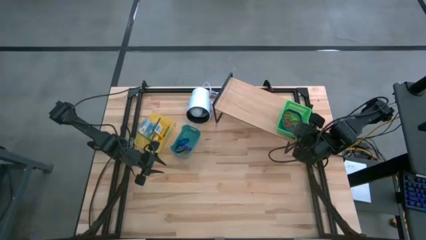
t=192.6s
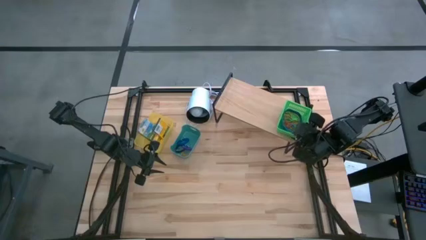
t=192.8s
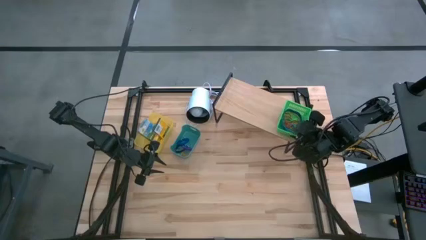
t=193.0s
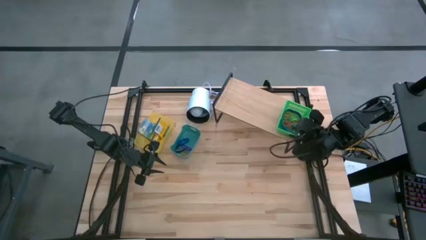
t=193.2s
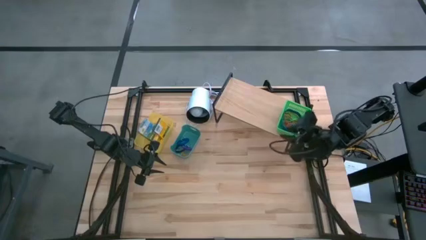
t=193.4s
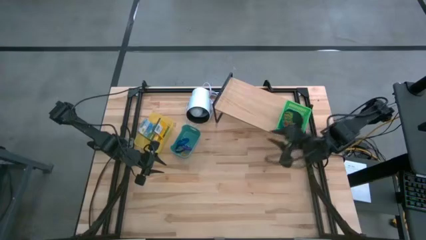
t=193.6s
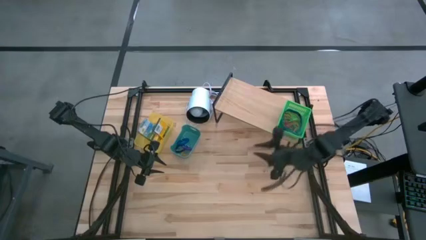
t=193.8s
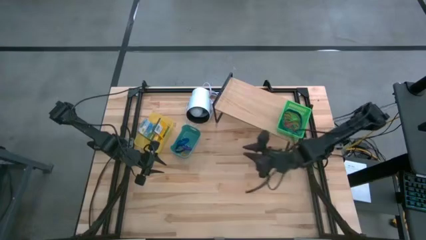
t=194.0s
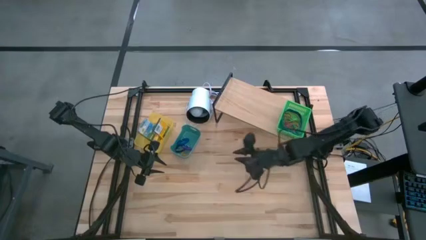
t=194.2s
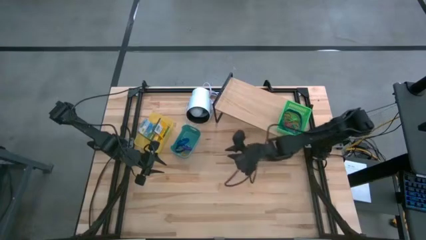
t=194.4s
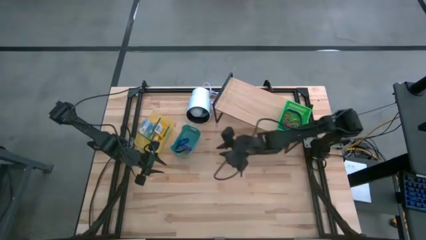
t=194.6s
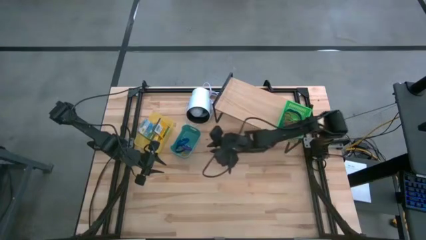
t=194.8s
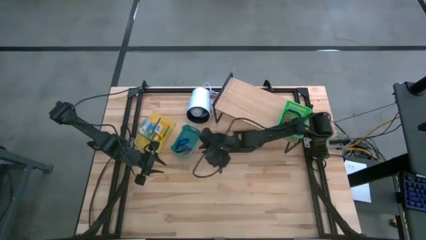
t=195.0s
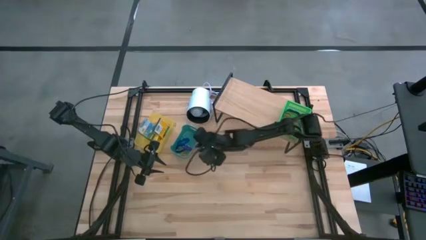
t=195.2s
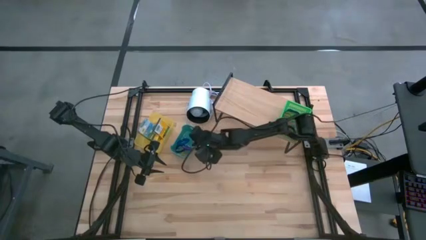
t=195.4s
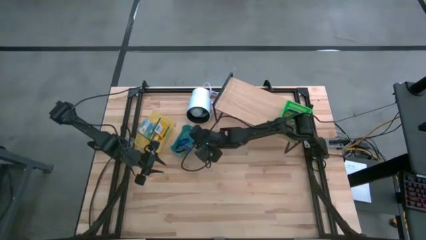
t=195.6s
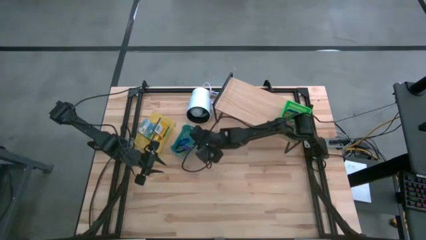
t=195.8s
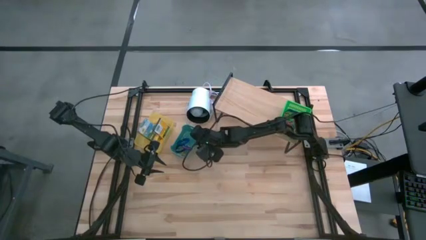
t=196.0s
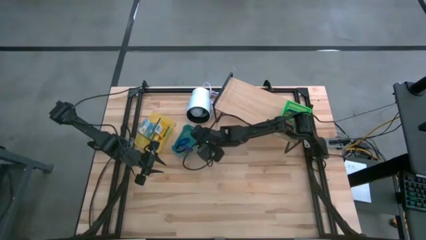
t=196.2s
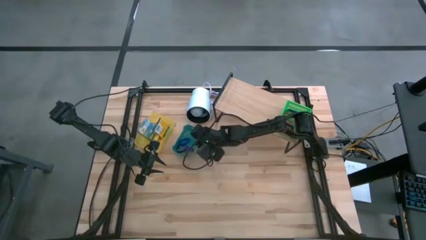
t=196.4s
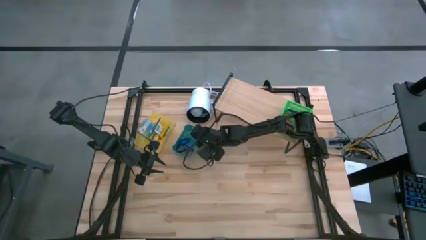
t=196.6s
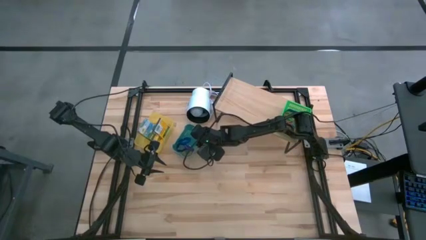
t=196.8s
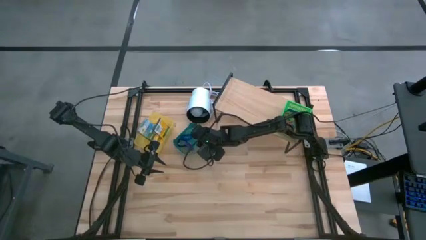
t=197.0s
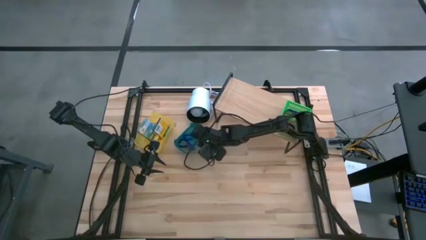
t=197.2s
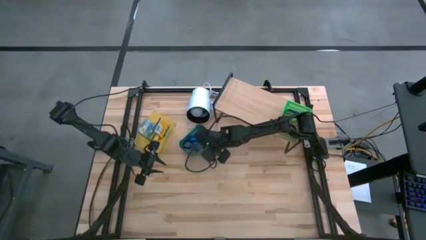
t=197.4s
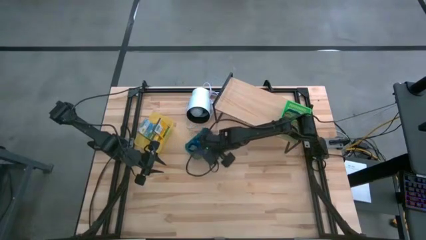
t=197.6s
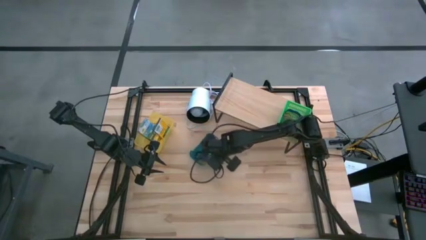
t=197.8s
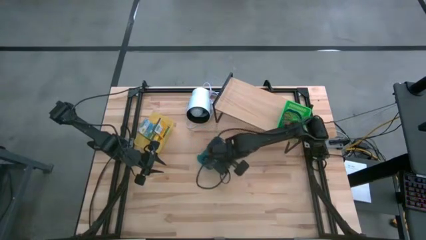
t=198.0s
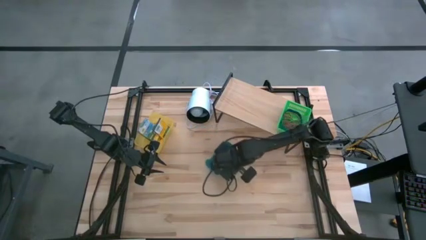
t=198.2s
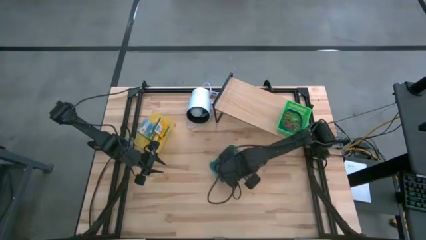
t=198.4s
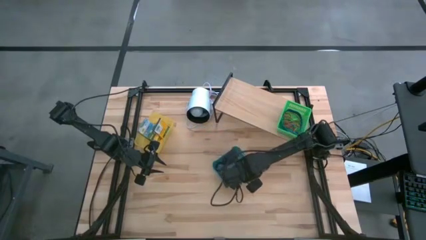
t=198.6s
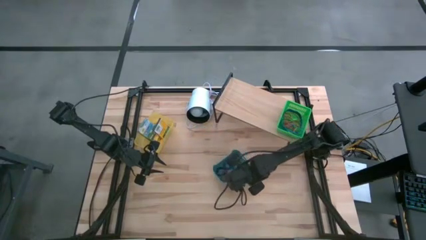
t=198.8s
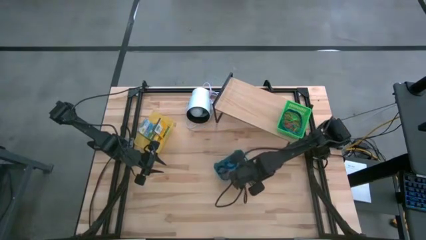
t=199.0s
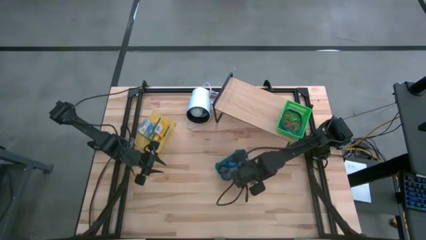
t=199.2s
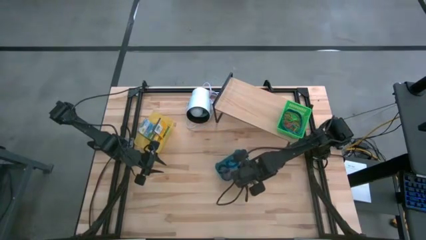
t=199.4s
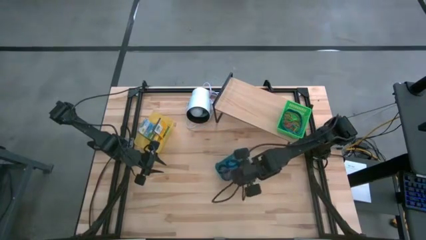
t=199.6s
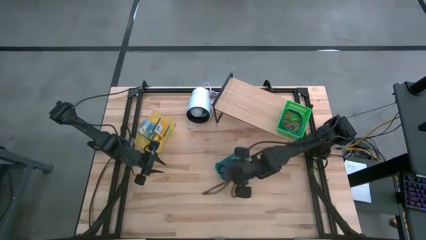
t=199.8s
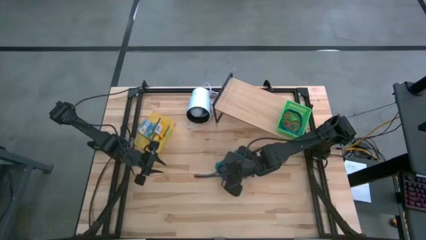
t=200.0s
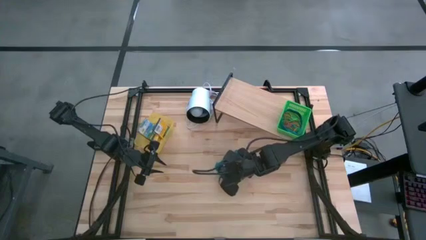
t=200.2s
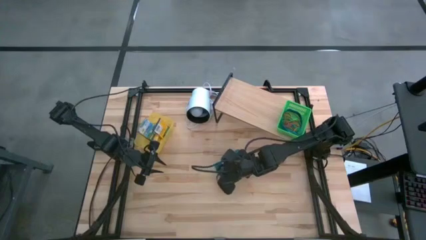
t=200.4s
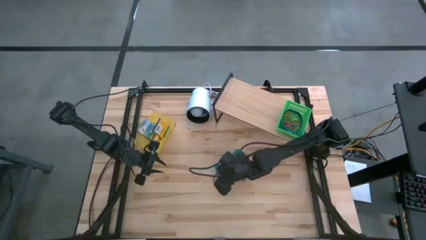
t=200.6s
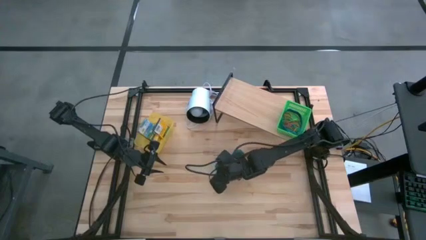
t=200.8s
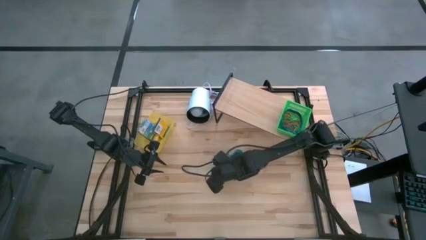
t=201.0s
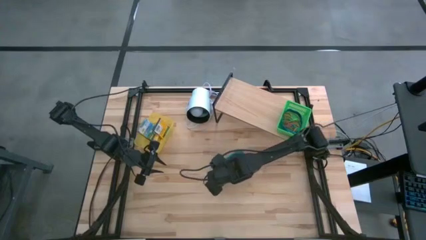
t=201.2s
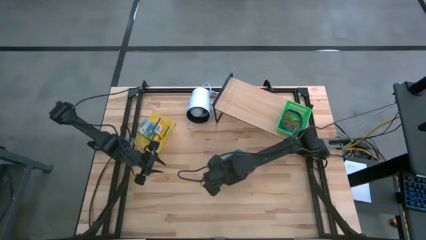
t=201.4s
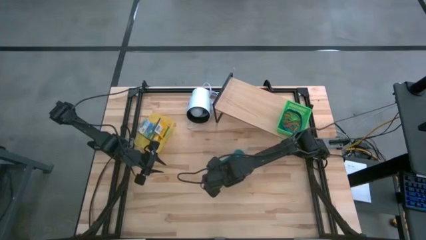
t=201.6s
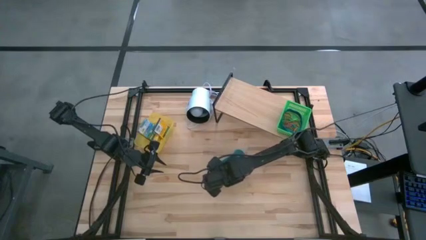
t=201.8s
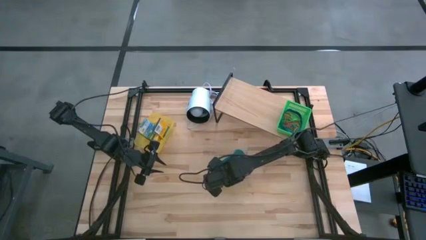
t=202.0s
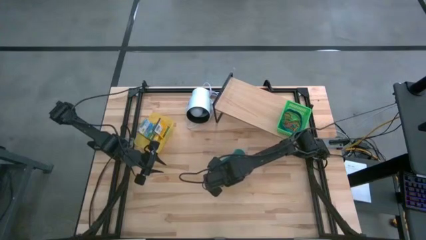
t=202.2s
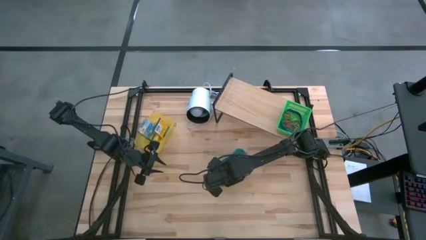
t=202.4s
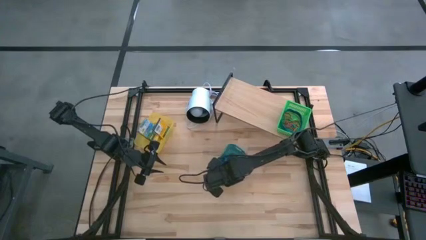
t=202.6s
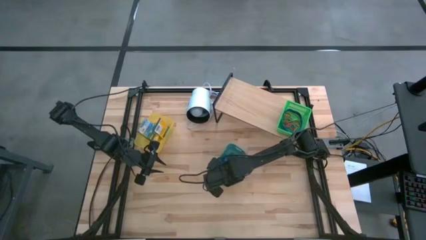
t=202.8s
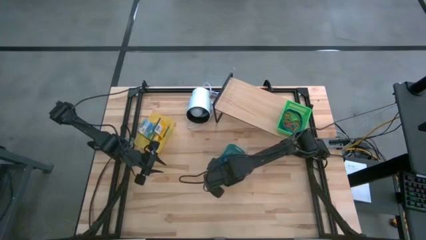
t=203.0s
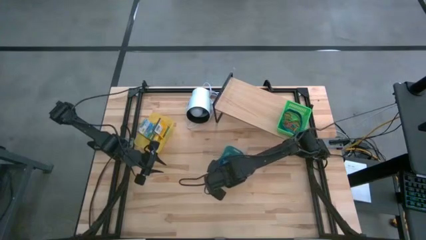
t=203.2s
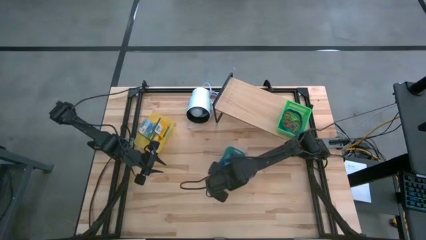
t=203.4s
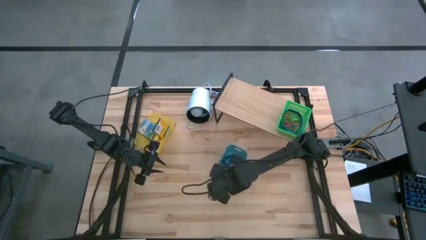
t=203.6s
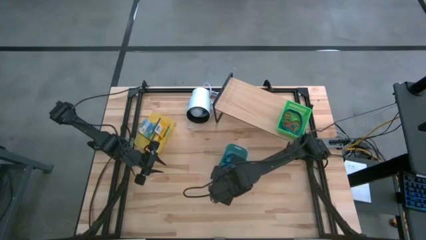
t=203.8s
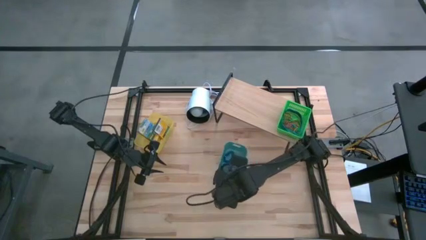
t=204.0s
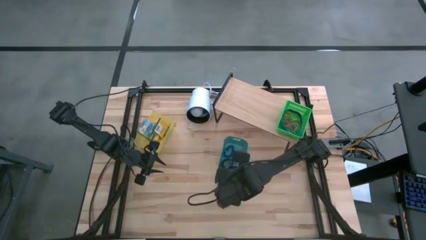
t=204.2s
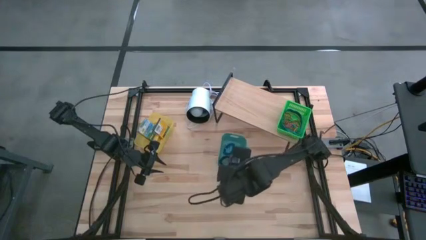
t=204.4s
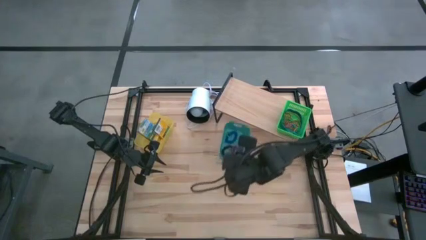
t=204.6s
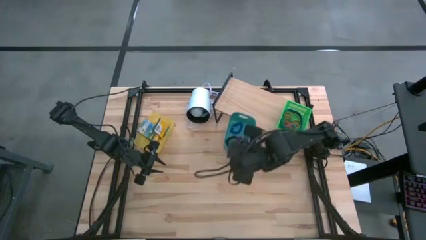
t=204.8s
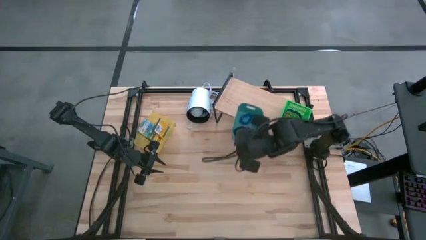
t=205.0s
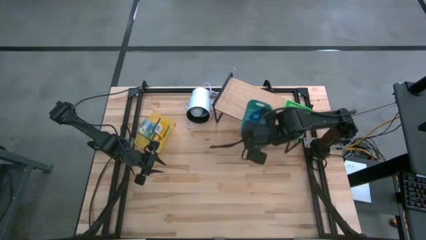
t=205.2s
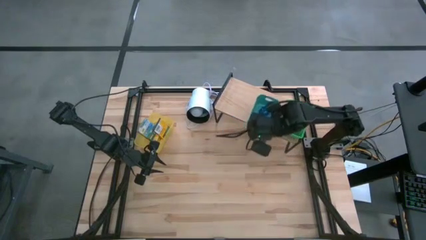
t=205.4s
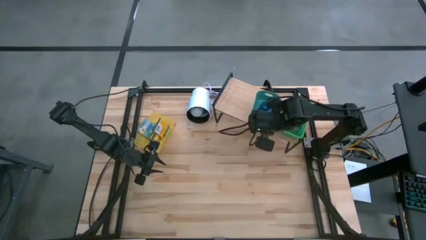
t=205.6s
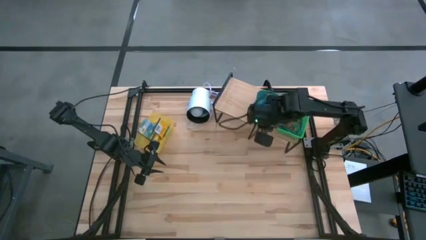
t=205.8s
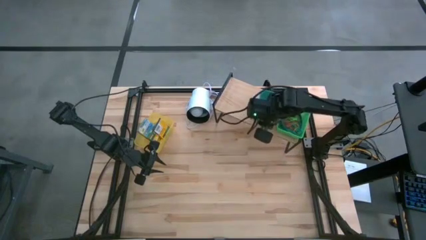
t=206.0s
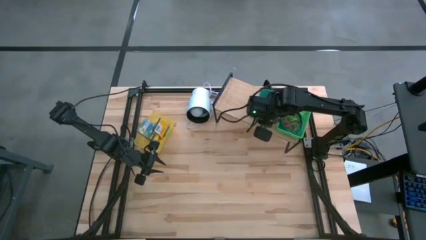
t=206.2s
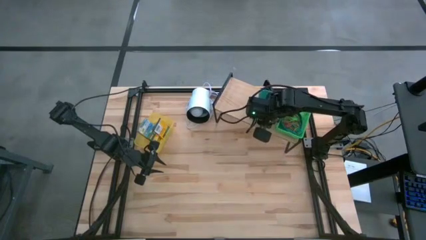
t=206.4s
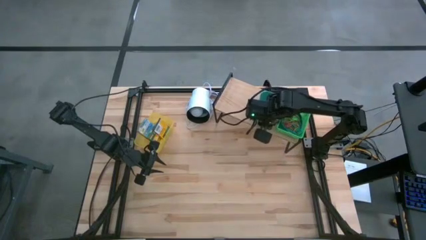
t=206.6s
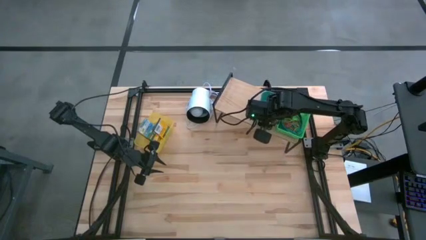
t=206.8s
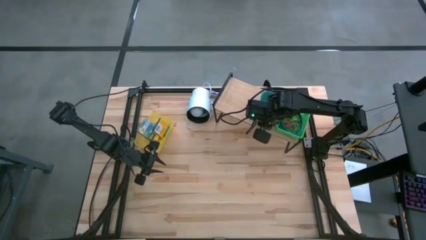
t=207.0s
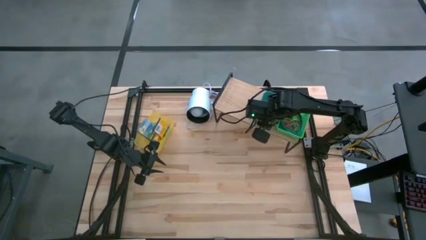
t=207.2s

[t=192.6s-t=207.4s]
Task: Pick & Place Office Desk Supplies
Put the blue bin on the shelf
